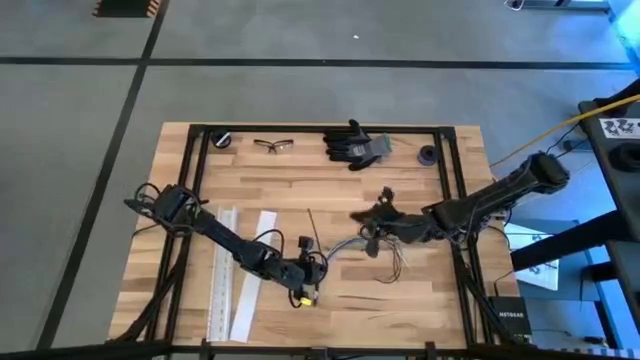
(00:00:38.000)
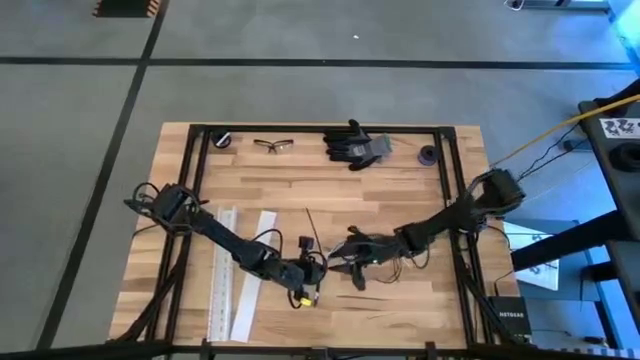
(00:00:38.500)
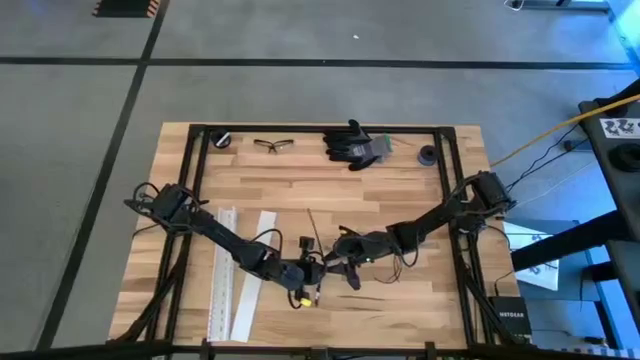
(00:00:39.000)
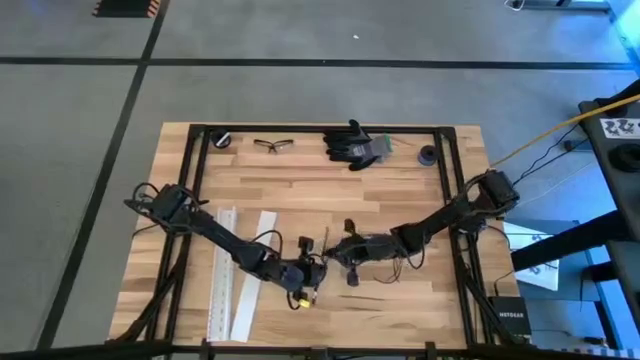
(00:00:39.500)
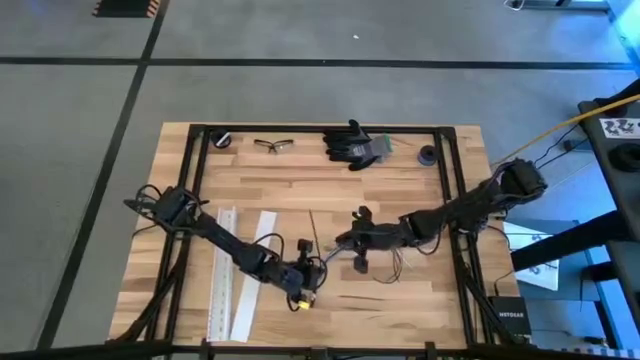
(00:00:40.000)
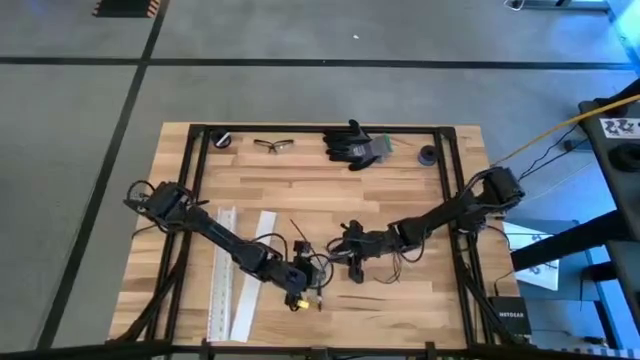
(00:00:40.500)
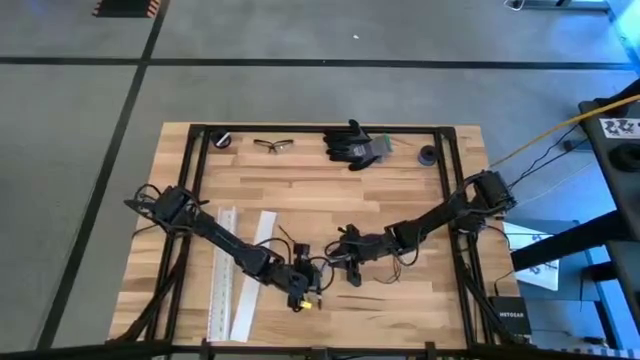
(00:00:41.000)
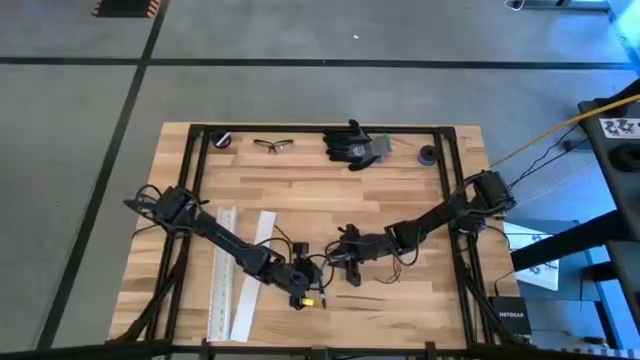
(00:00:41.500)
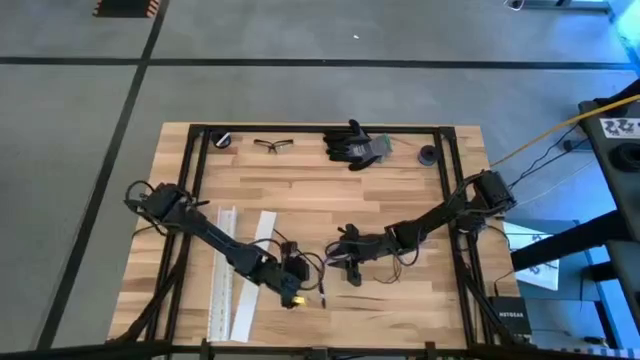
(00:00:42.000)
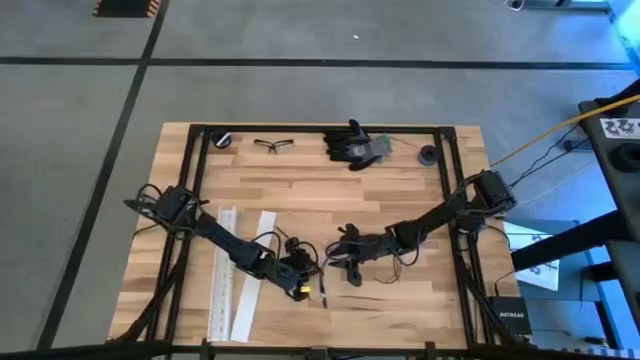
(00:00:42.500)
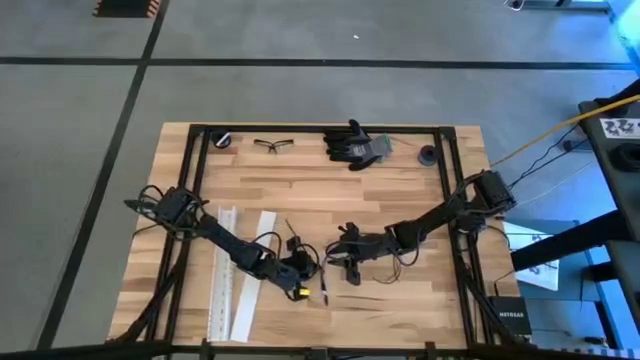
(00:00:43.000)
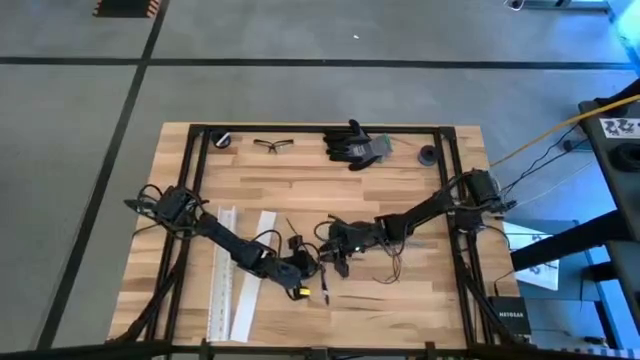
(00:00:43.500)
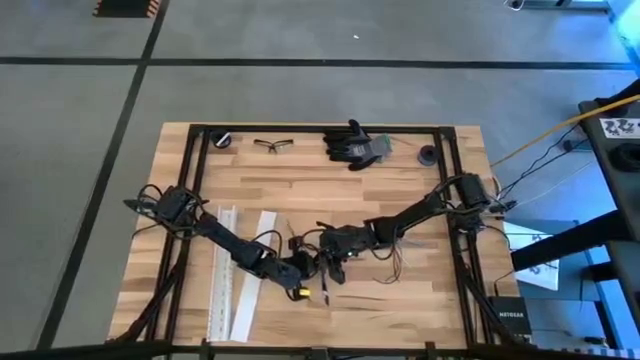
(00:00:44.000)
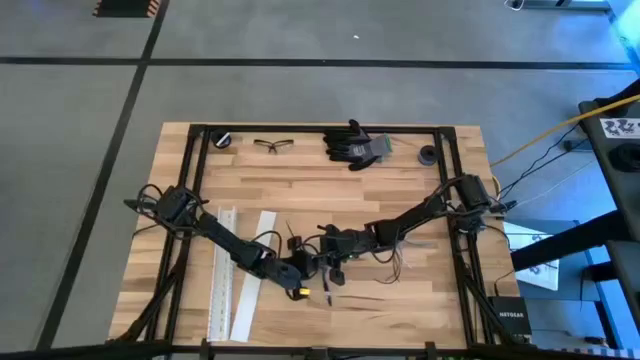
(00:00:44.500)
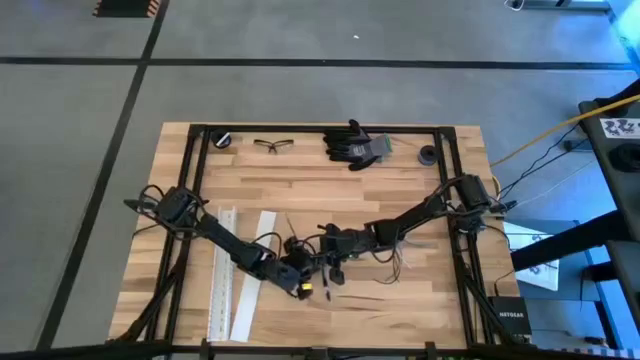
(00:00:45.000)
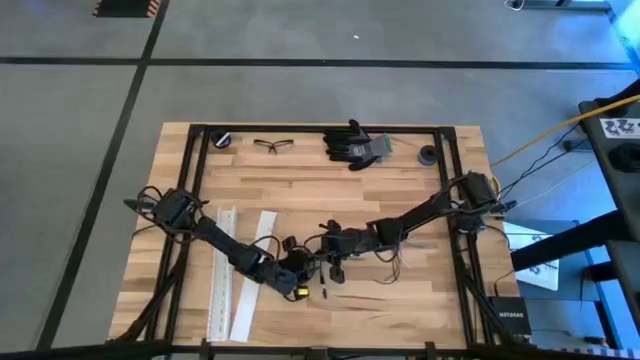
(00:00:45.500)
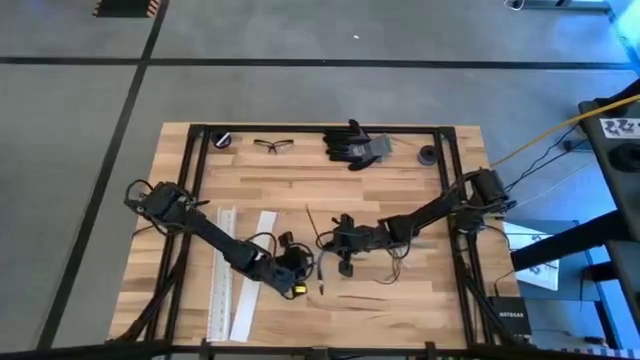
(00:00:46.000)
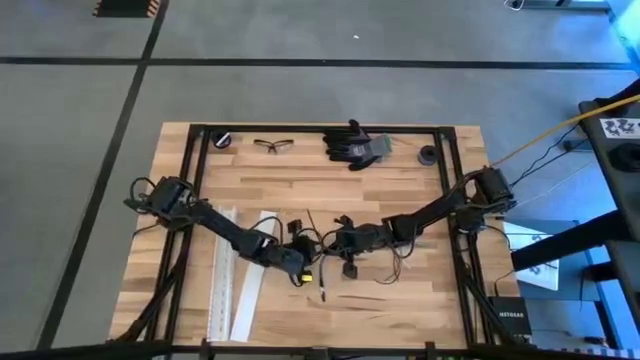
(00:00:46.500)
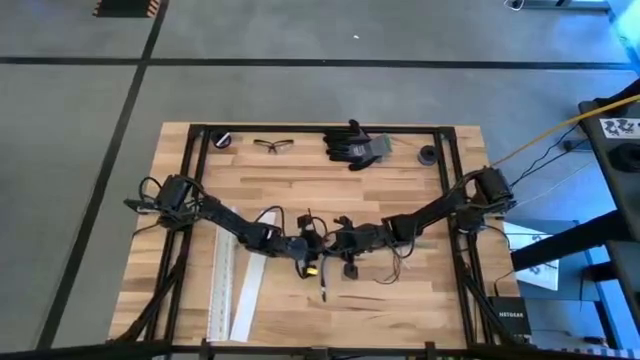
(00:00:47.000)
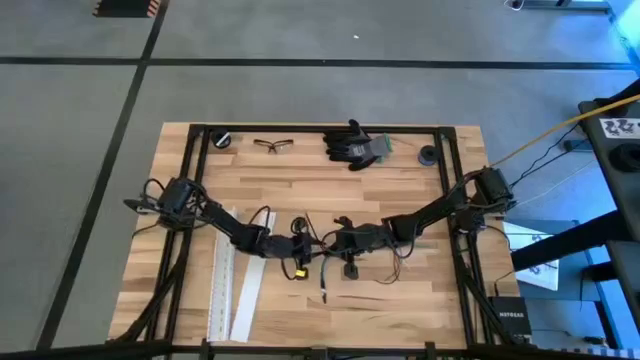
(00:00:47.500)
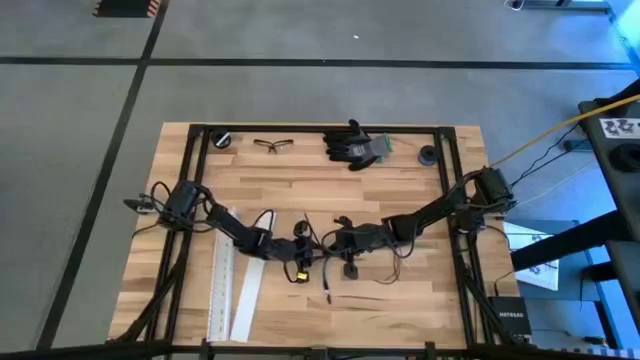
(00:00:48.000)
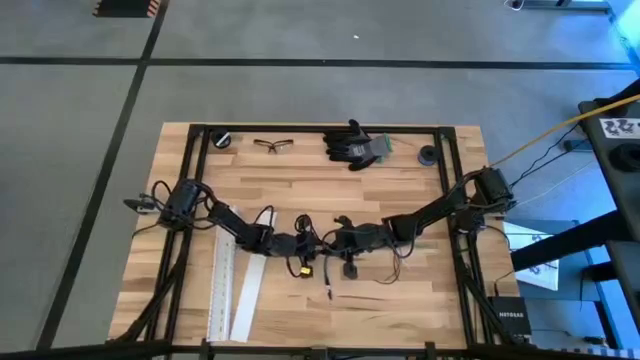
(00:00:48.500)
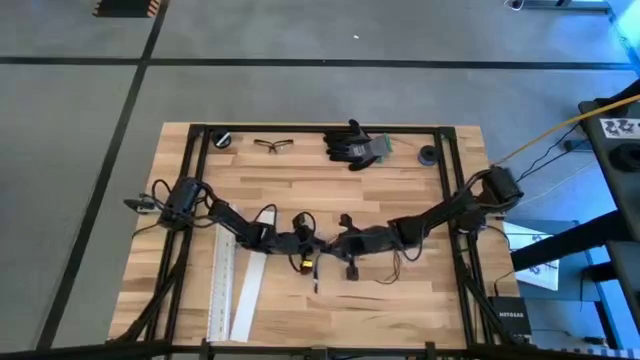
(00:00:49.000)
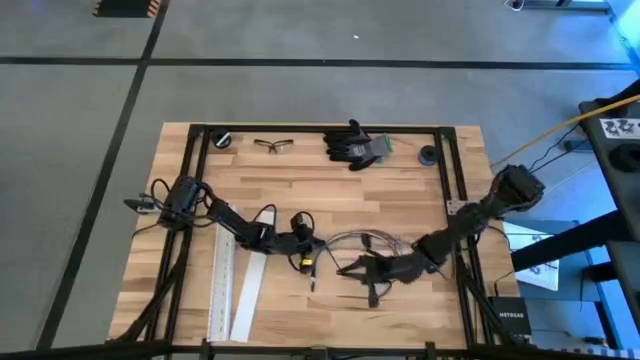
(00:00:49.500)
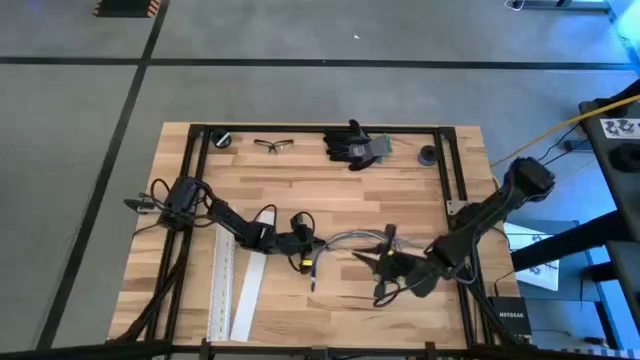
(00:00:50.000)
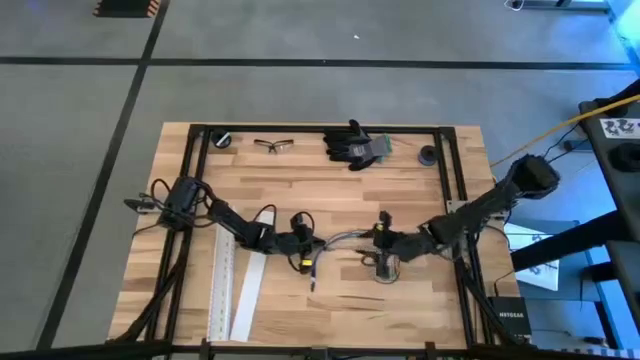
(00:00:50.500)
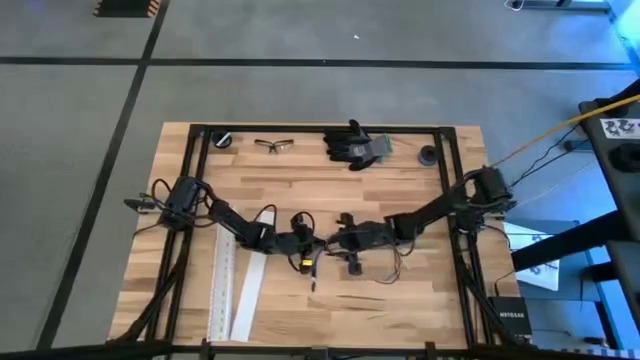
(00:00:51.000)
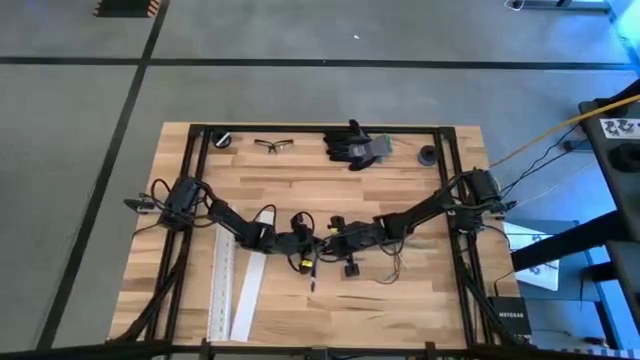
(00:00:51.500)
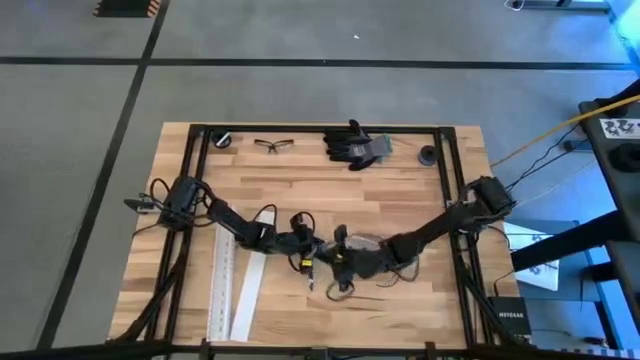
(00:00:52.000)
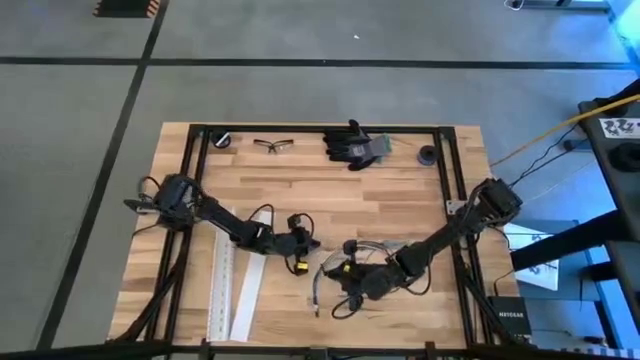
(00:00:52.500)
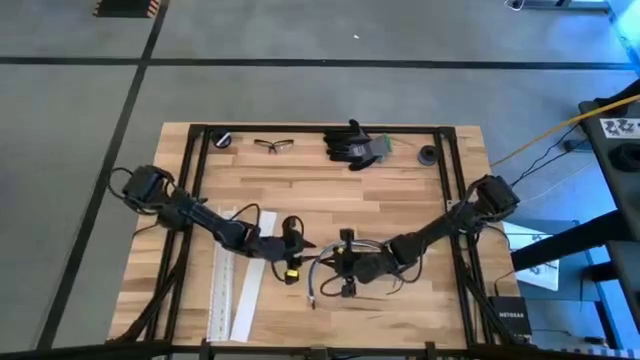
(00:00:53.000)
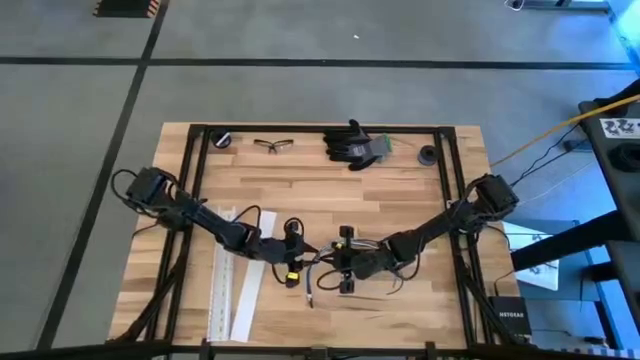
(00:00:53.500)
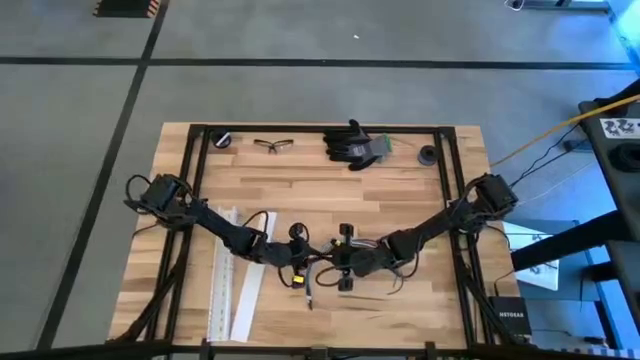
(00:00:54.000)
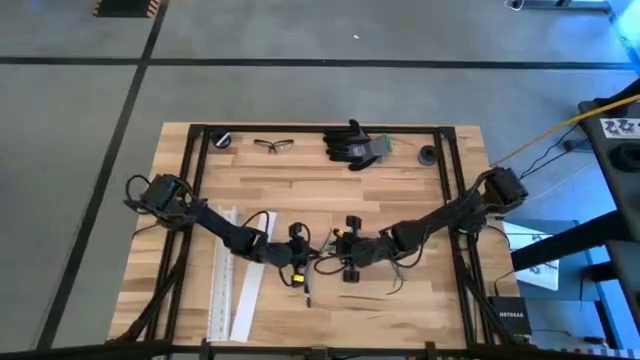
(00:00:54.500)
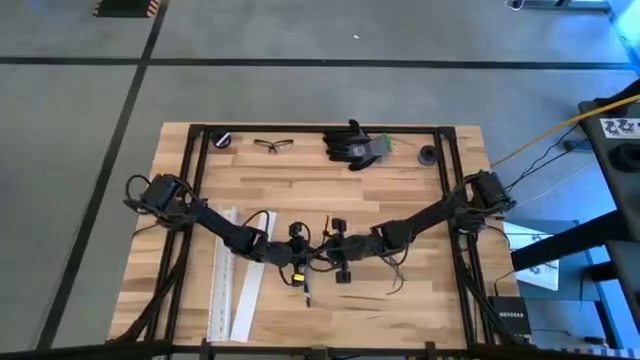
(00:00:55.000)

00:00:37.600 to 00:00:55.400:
Task: Ziptie cables
Wrap the black zip tie around the cable wires to form a loop
